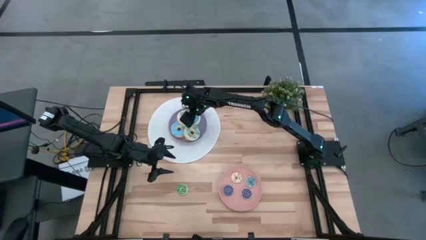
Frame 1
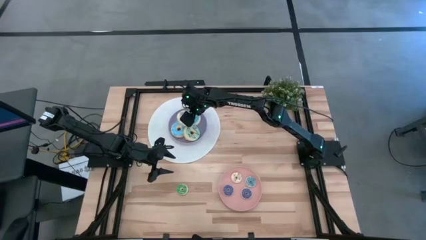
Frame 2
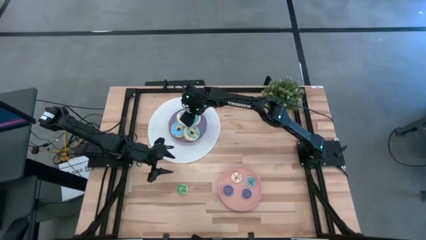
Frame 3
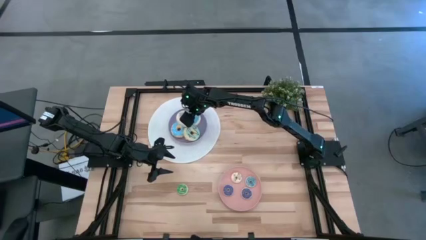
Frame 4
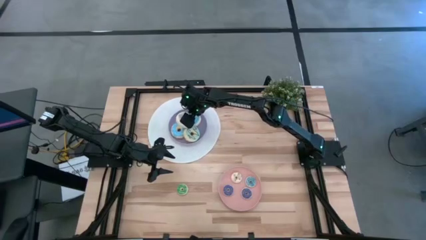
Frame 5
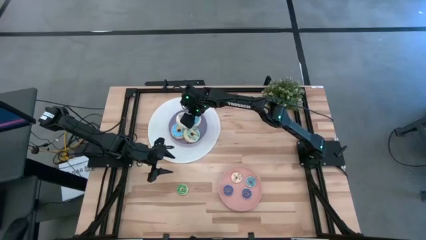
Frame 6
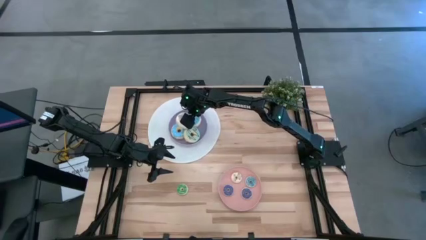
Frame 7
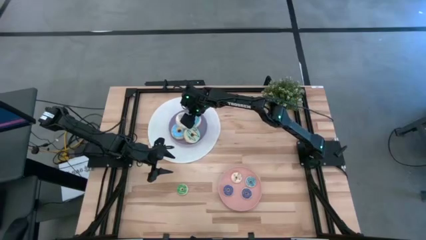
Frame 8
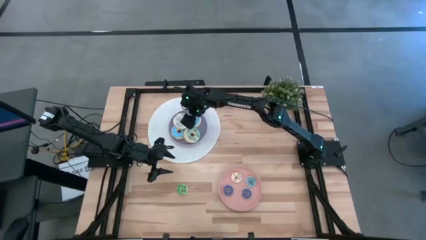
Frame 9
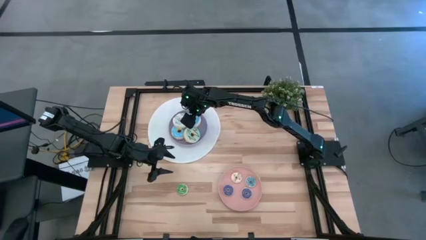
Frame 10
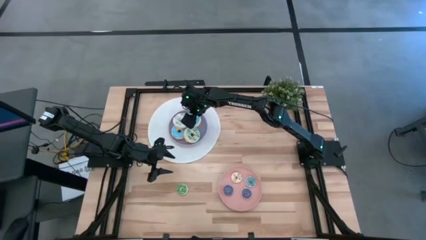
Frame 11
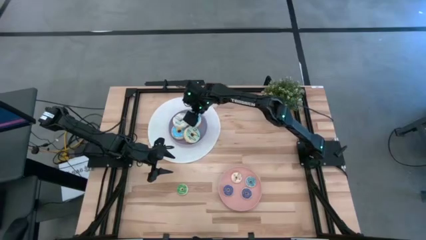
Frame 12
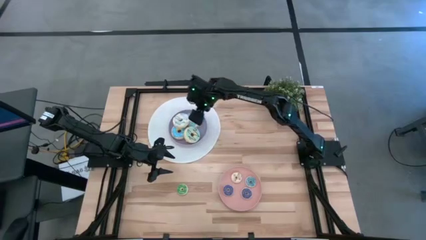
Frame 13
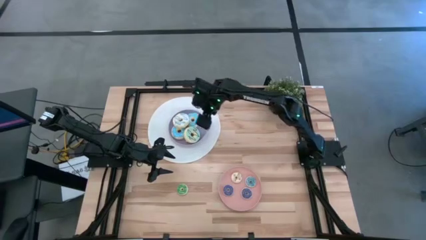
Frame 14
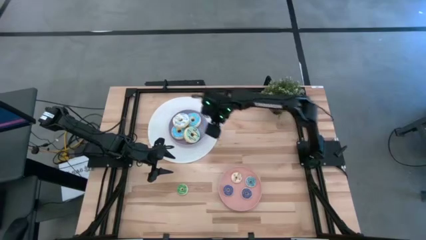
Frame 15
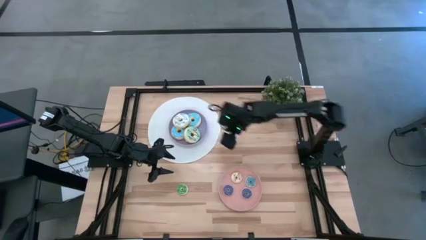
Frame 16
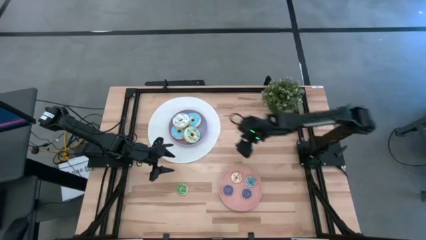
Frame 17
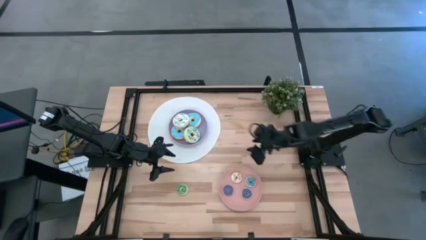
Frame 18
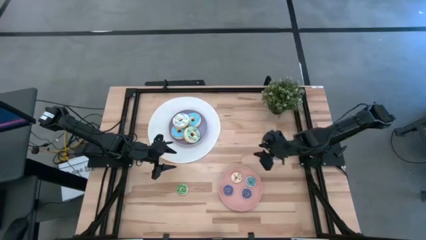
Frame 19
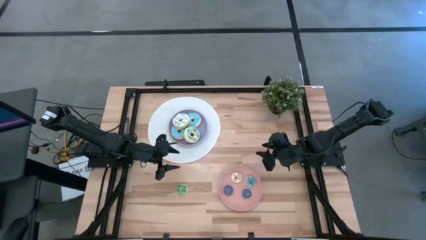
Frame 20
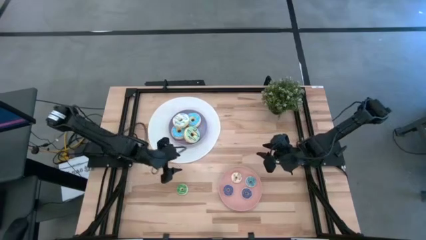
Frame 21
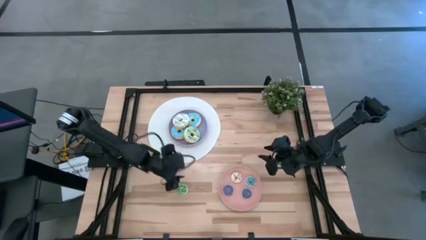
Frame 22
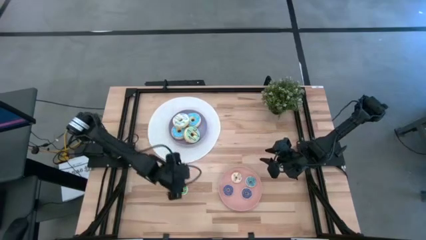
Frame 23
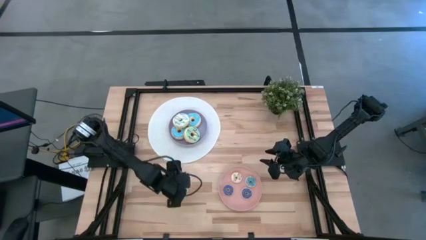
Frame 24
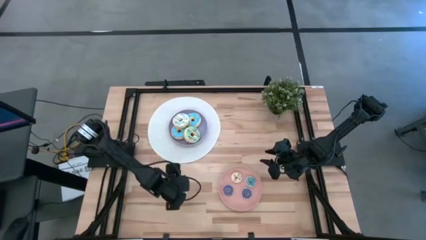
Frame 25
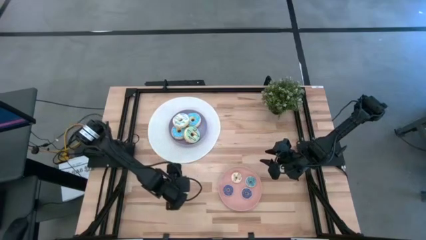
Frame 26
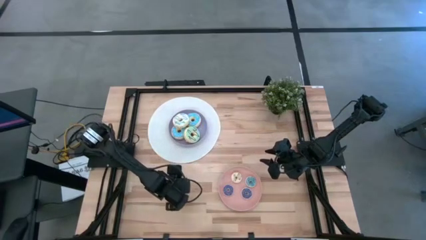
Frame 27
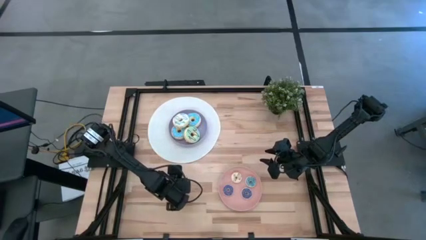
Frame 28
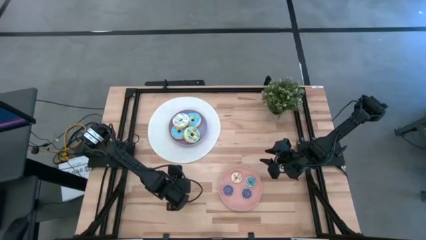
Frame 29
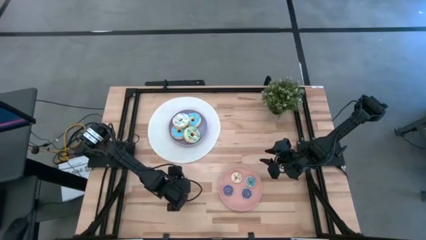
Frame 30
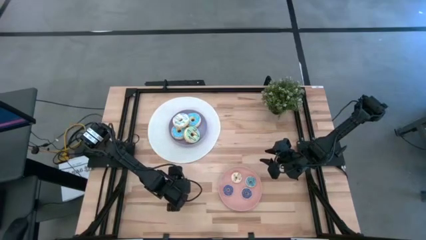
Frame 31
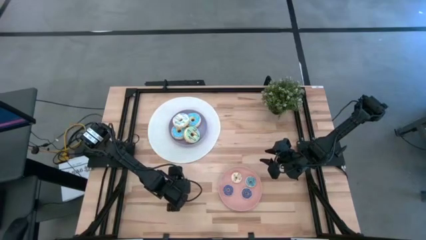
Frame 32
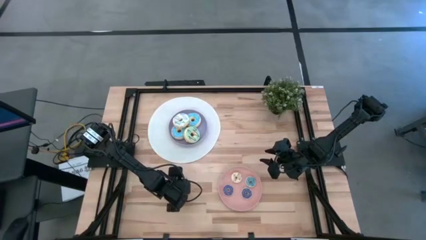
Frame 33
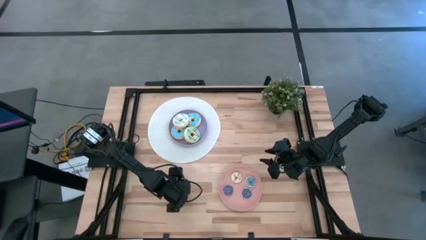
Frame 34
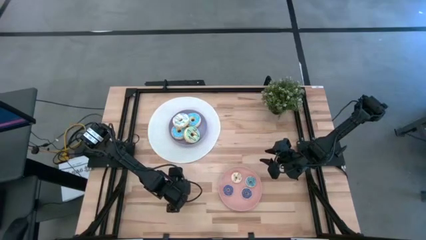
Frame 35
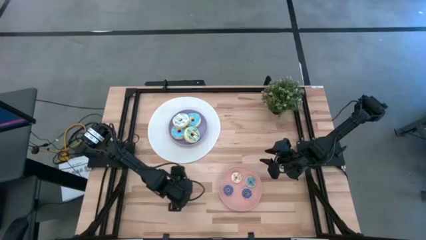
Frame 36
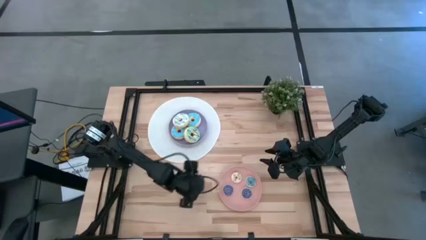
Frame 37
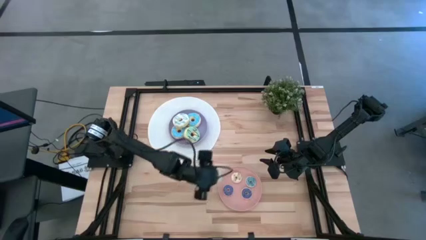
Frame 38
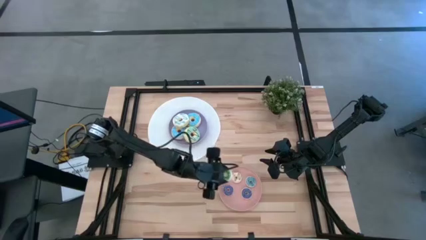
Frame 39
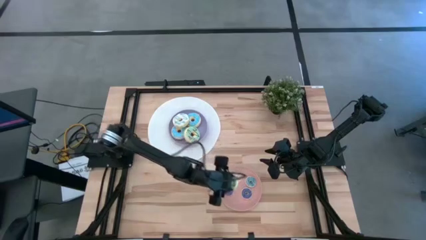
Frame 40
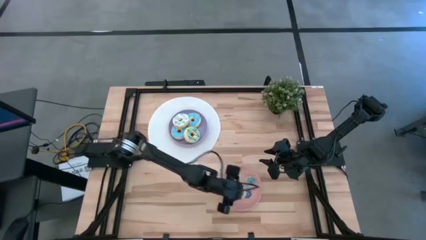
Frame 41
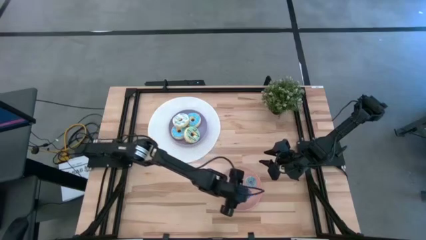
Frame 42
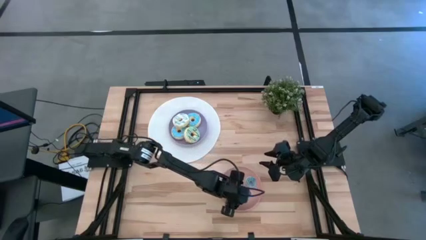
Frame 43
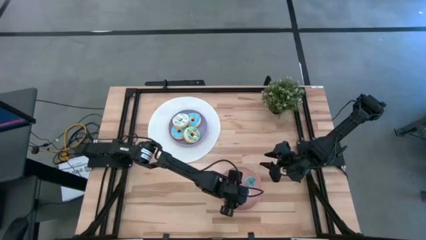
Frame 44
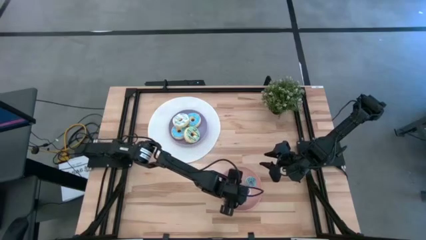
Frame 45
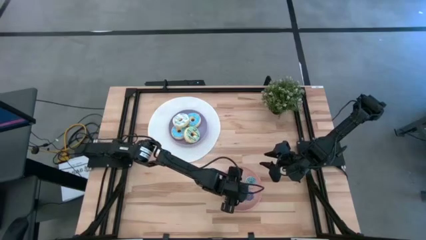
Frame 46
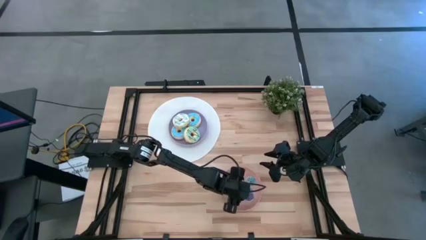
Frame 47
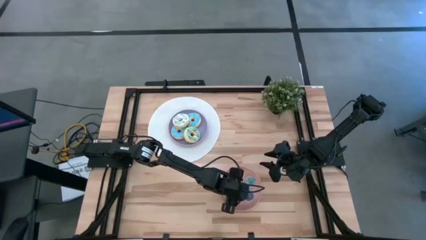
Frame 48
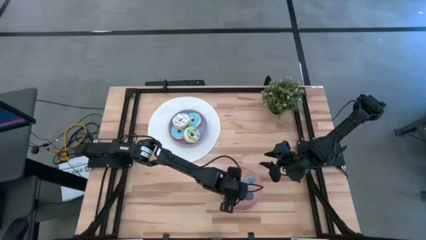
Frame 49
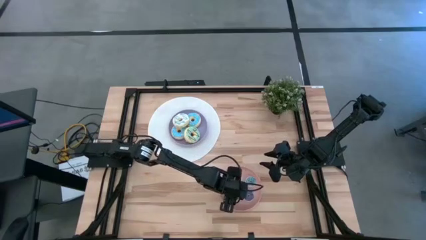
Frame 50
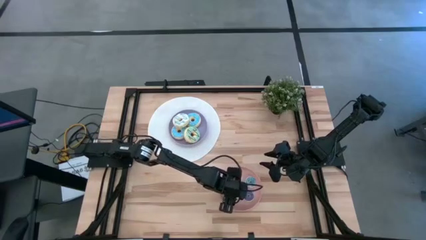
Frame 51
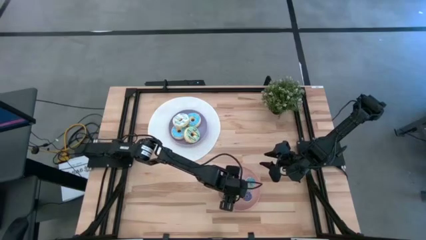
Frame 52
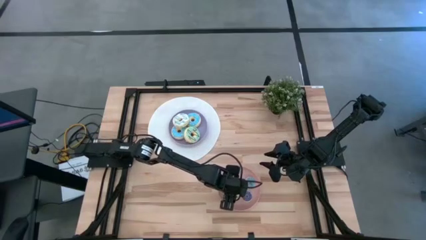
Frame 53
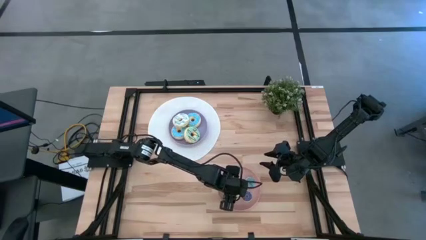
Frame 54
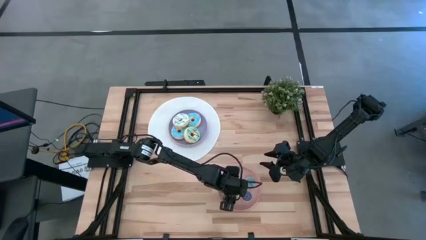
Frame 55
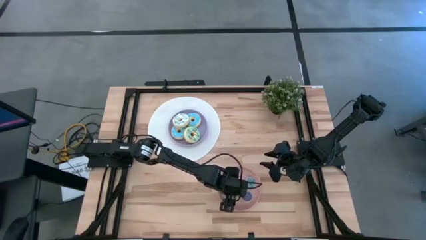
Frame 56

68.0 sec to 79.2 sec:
Task: Pick & Place donuts
Put the green donut on the pink plate
